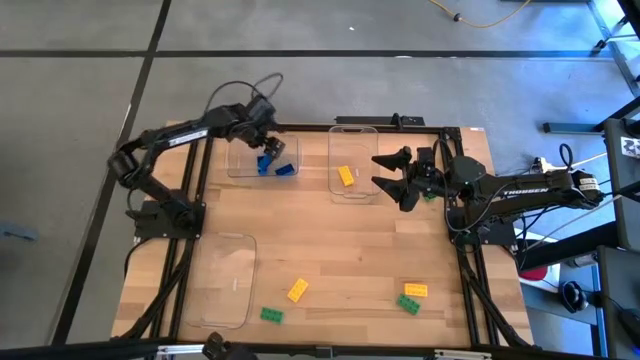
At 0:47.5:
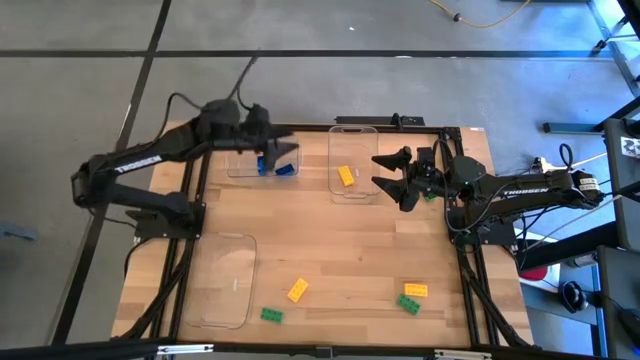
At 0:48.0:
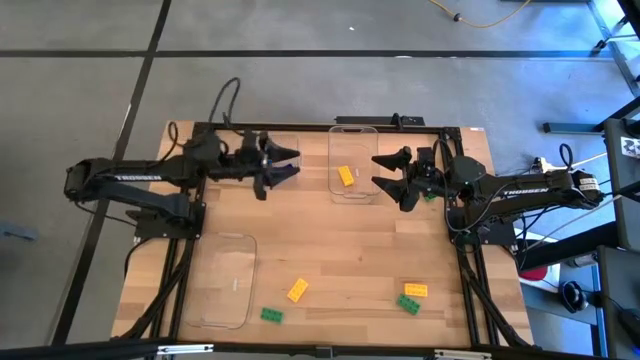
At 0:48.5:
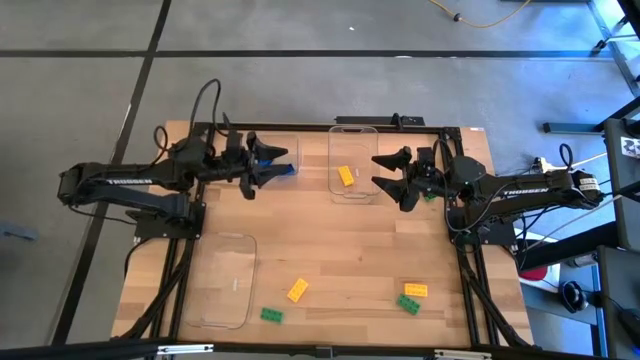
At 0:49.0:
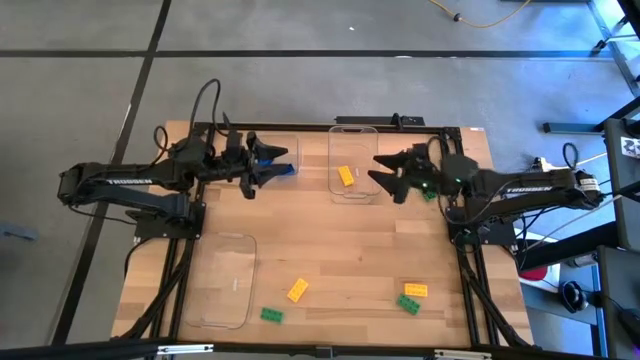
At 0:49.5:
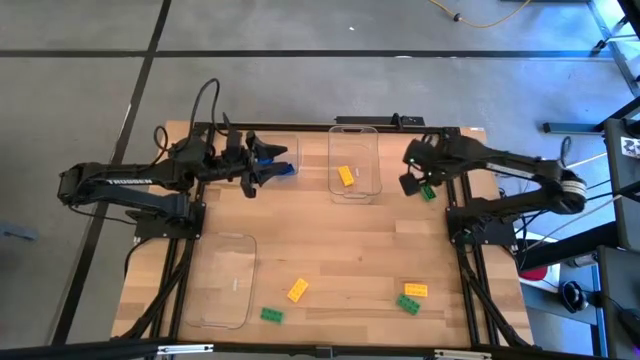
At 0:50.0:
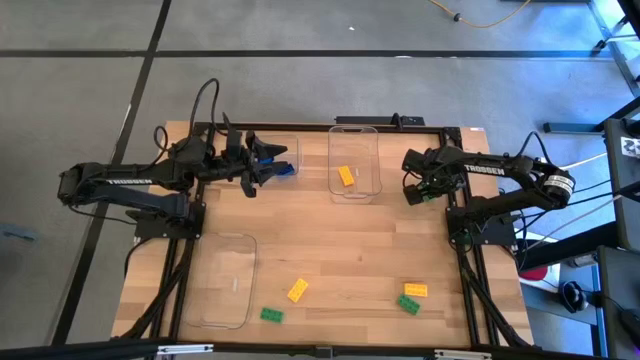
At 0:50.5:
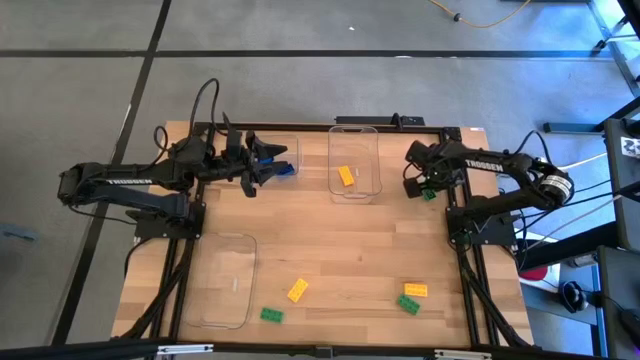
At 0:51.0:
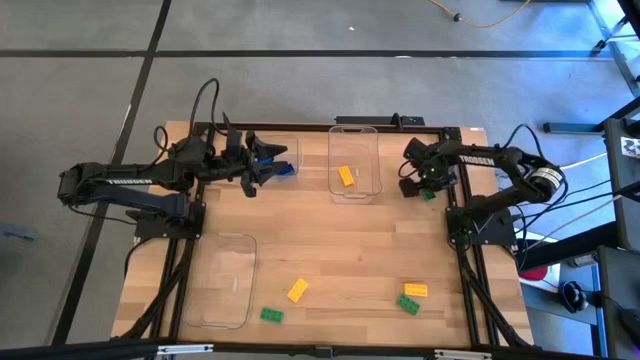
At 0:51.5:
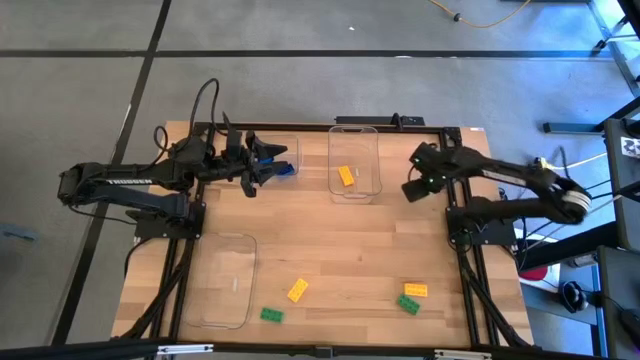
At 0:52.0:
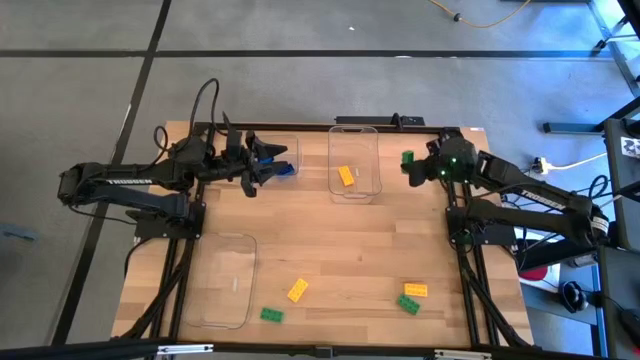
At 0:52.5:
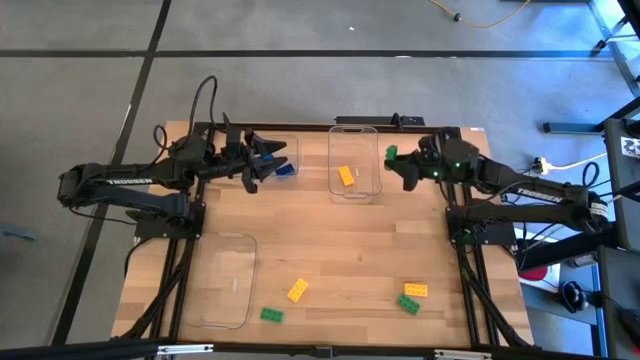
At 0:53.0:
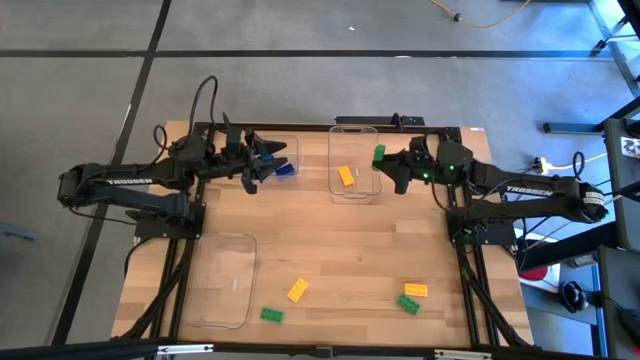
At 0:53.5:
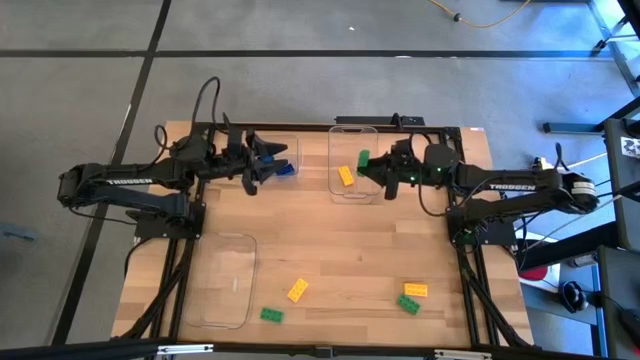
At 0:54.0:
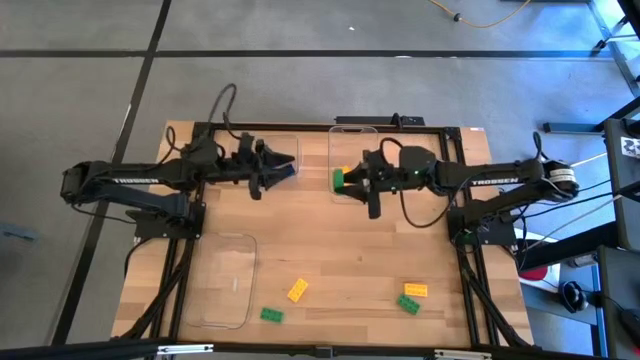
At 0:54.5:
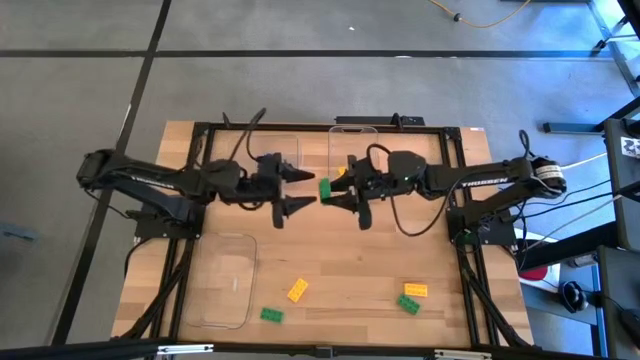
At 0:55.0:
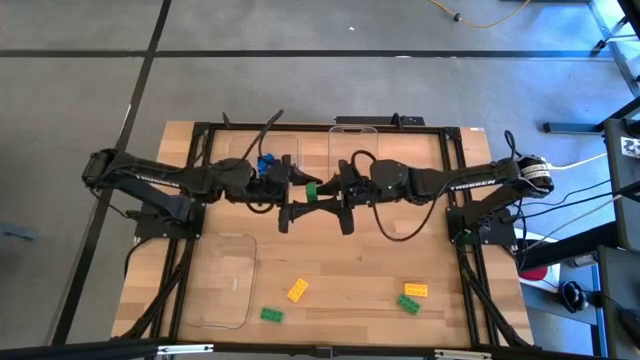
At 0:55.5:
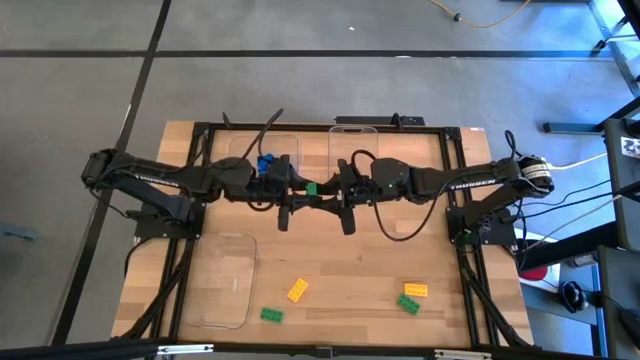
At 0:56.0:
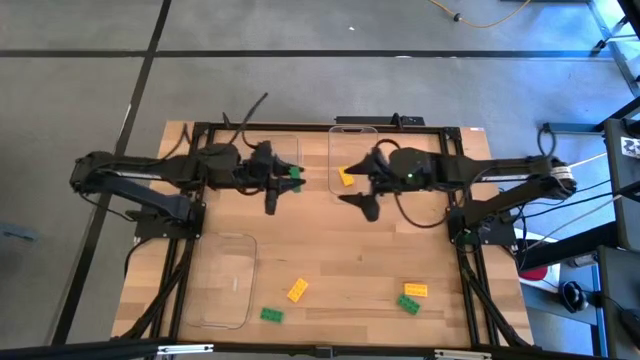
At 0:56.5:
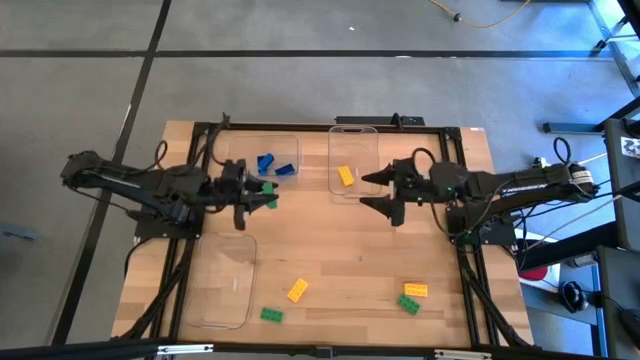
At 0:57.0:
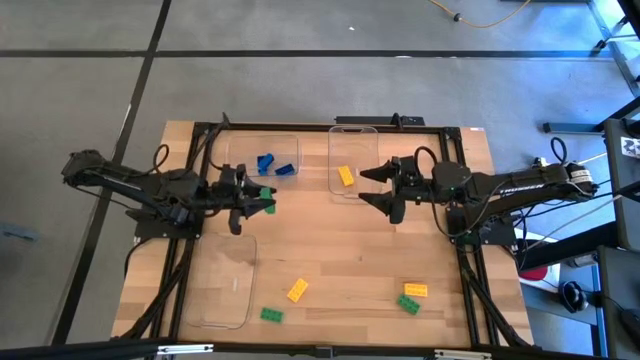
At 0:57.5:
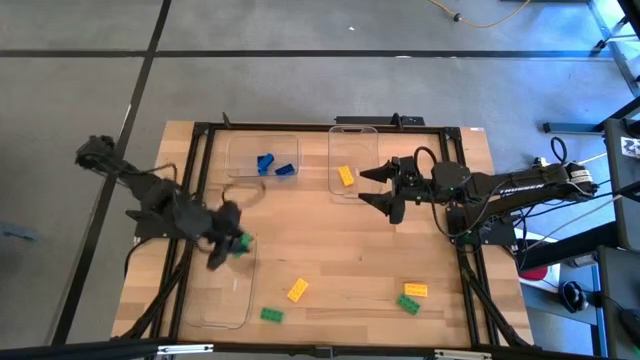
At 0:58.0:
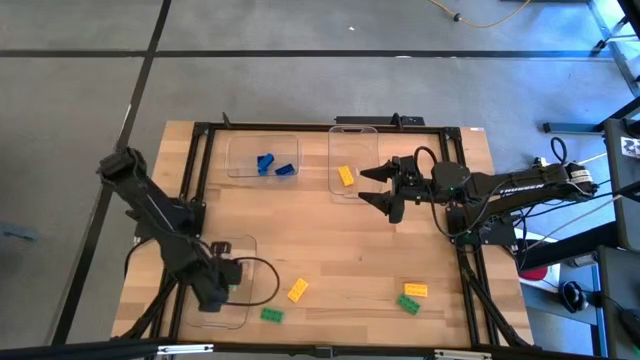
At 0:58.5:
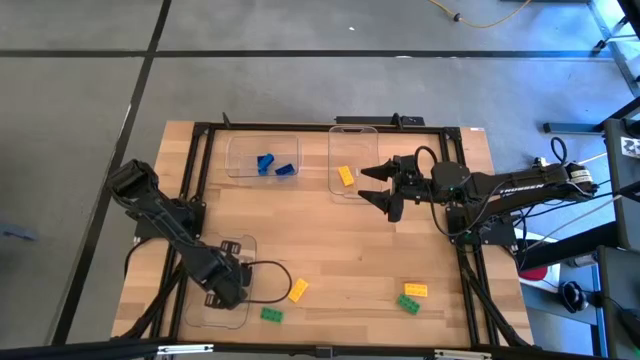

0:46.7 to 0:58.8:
Task: Sort & place blocks by color
Put the top right green game piece into the bottom left transparent bin

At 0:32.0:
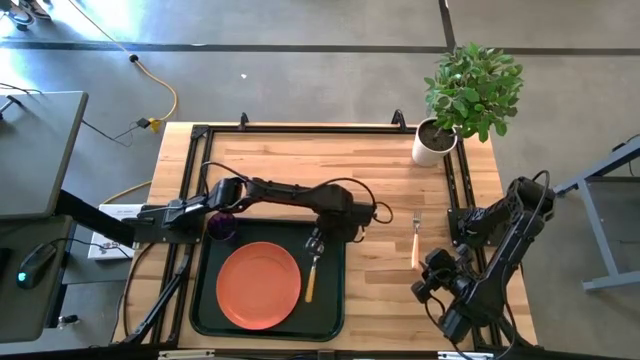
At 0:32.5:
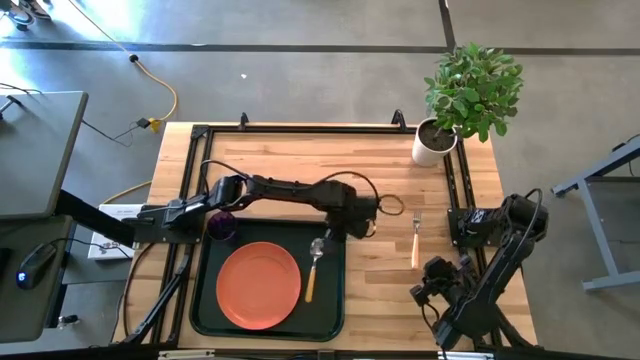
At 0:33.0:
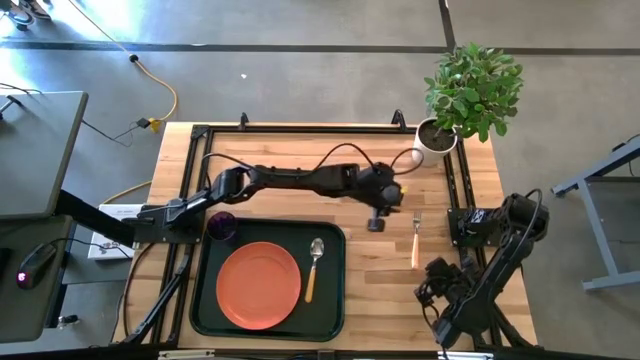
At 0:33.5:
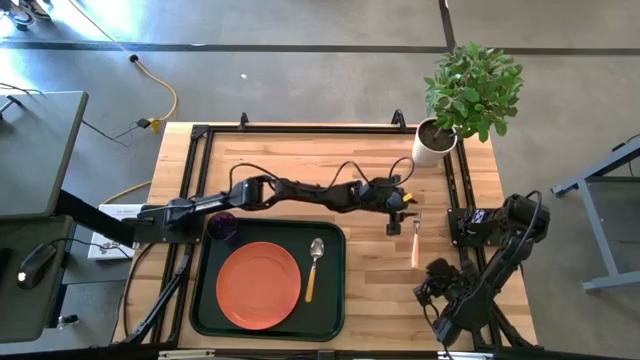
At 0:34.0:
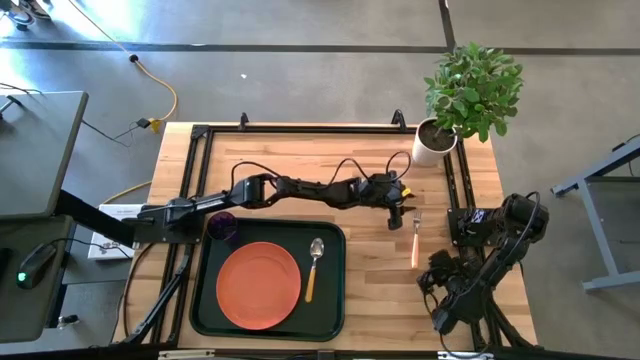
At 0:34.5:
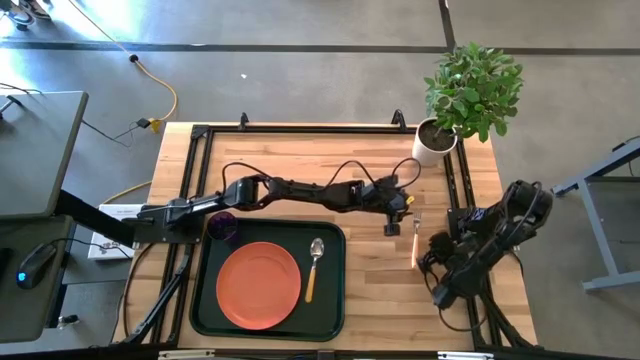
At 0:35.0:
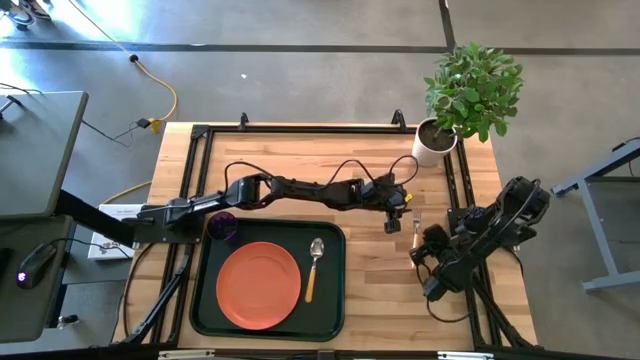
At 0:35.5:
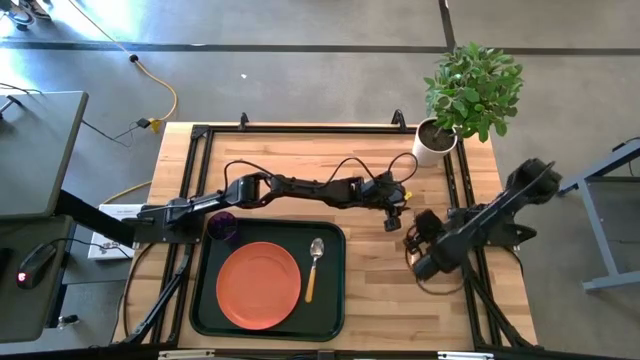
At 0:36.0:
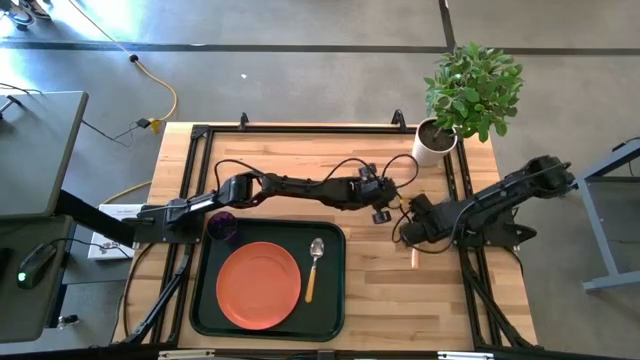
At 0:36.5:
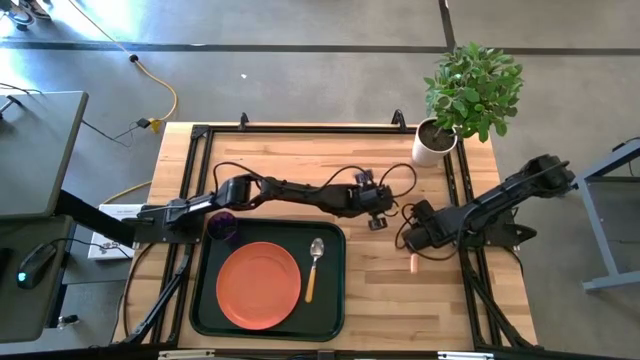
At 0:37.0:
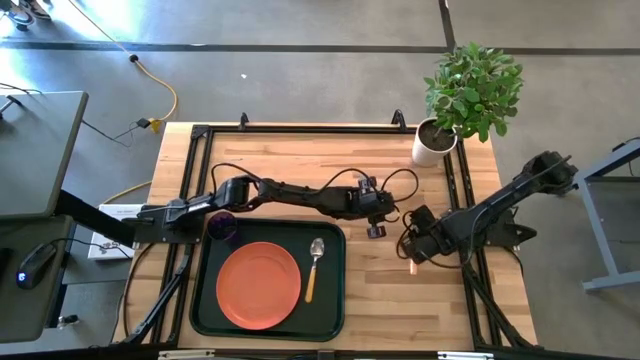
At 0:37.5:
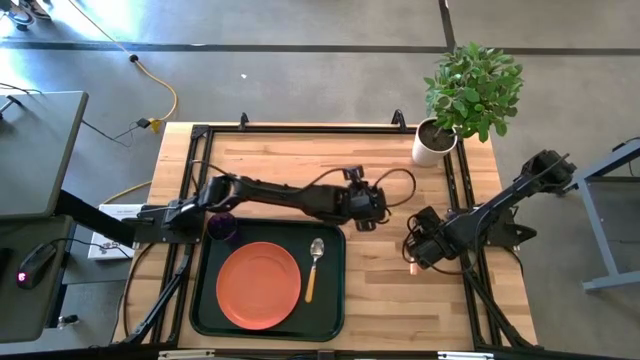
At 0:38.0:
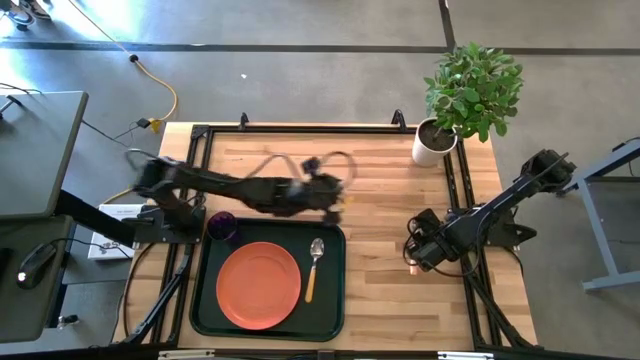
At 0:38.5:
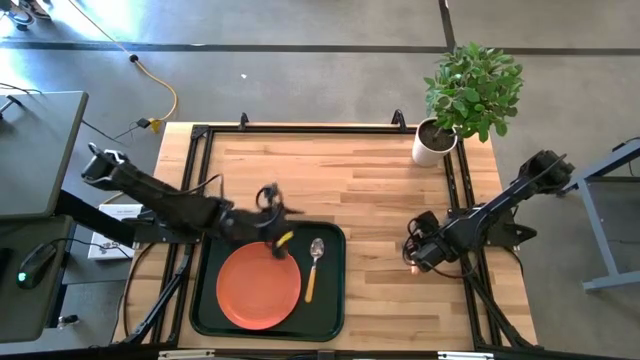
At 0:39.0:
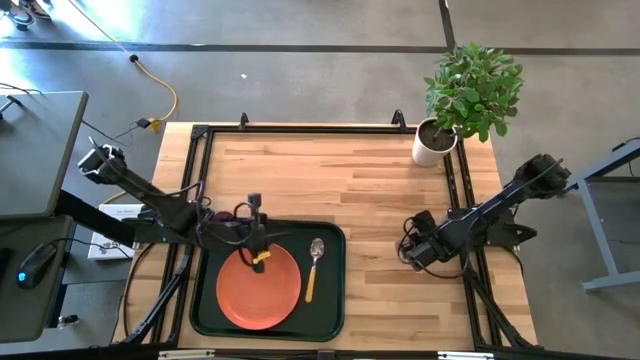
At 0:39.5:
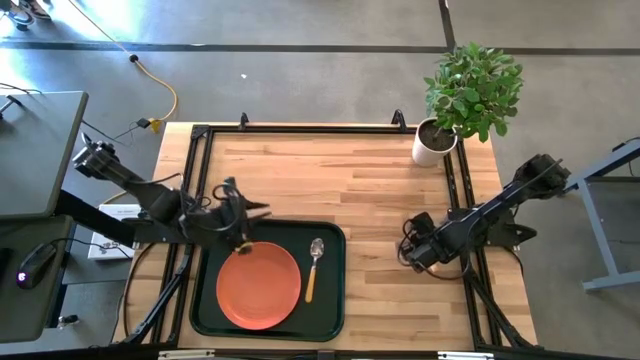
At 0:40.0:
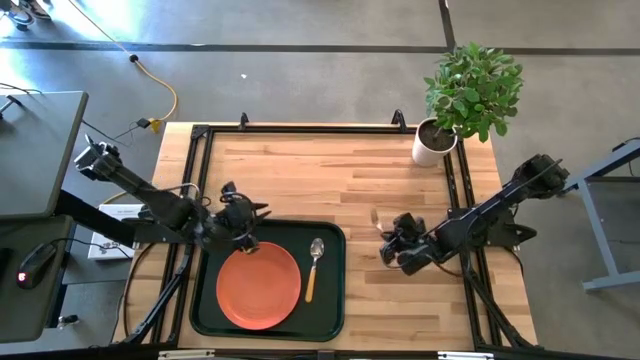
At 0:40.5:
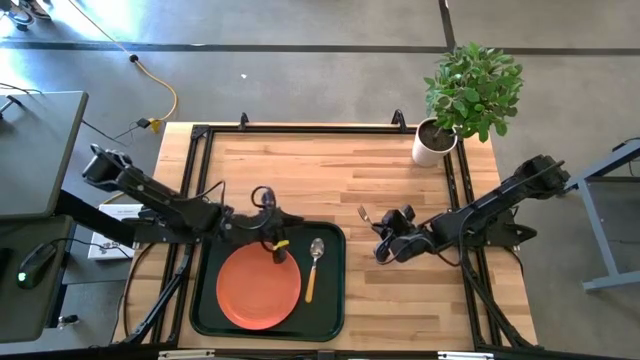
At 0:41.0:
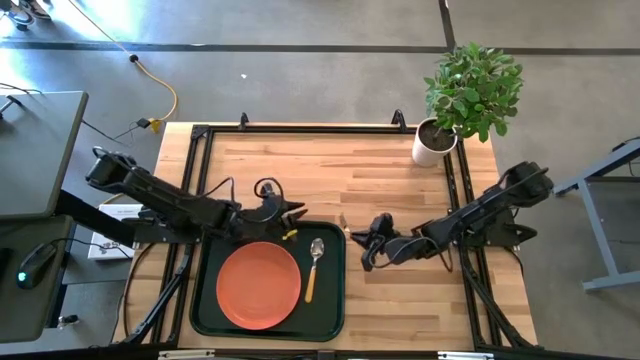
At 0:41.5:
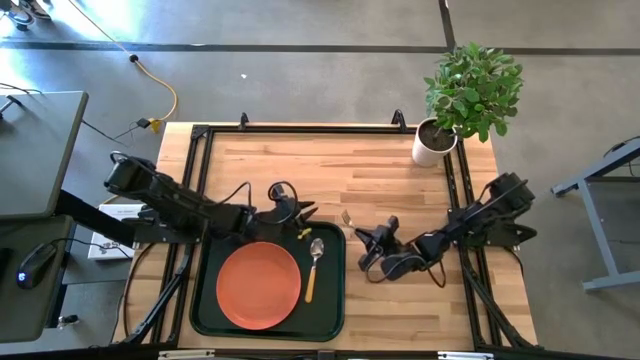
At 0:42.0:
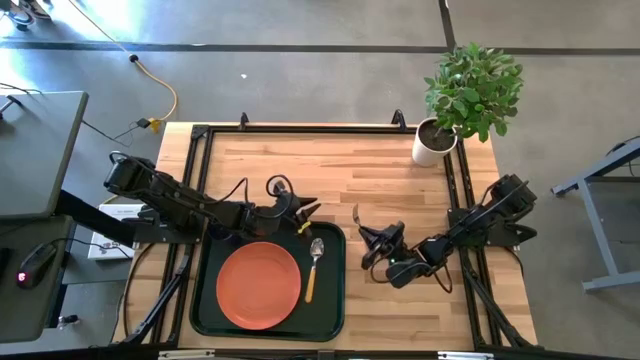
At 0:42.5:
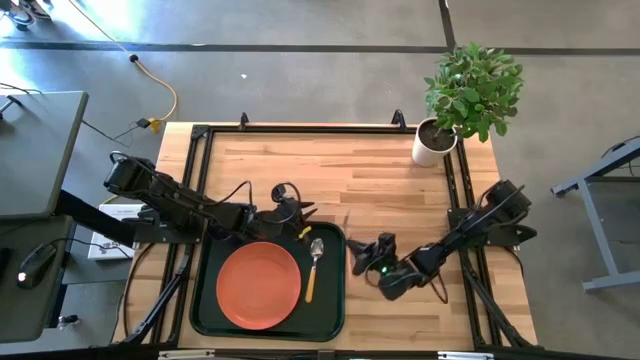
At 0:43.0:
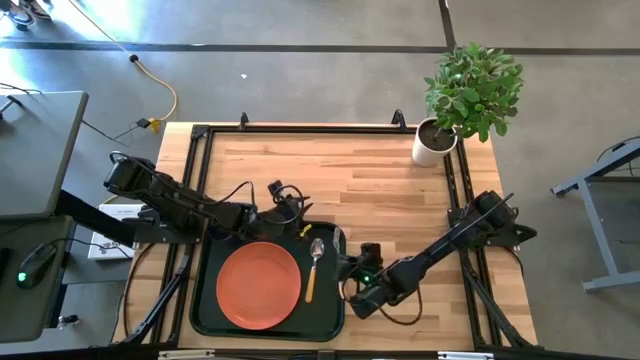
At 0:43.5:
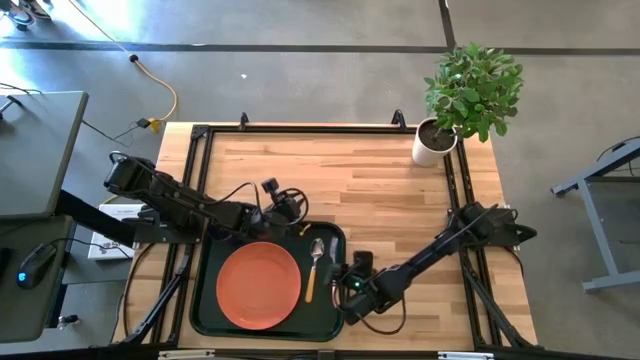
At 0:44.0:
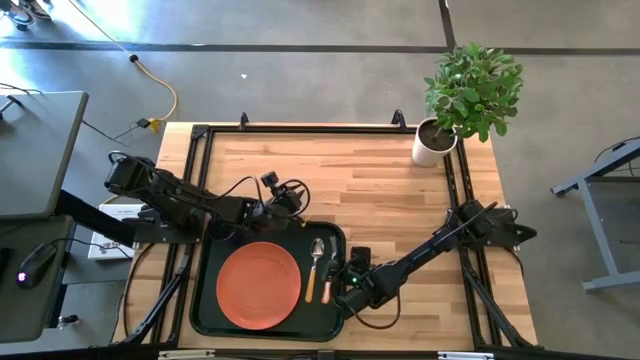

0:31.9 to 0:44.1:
Task: Pick and place plate/cup/fork/spoon on tray
Put the light orange fork on the black serving tray to the right of the yellow spoon
